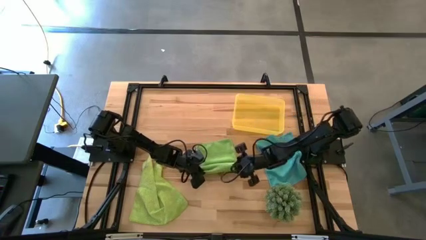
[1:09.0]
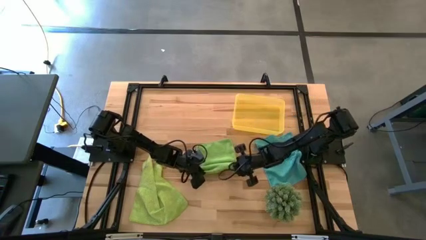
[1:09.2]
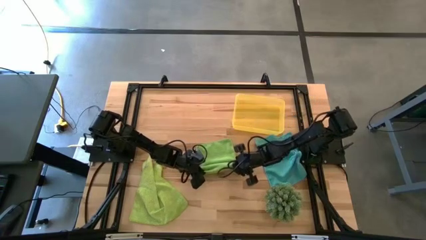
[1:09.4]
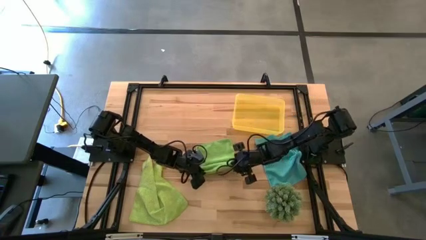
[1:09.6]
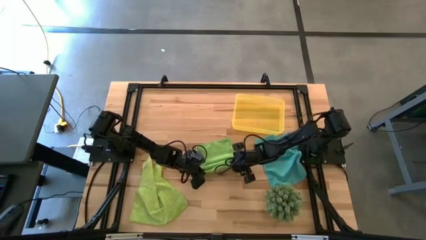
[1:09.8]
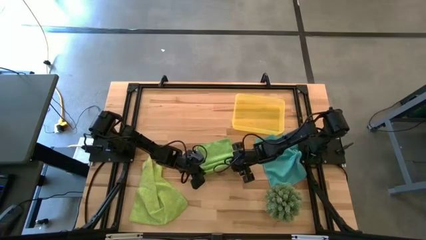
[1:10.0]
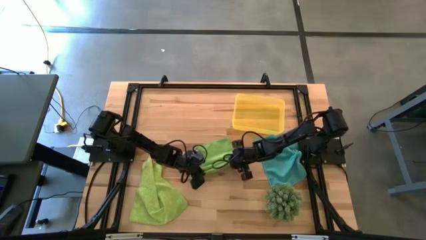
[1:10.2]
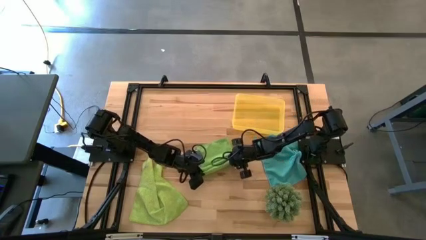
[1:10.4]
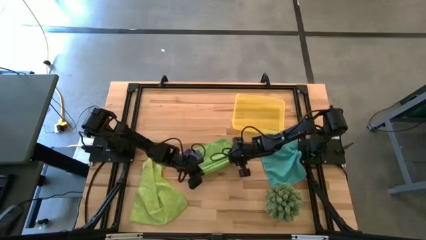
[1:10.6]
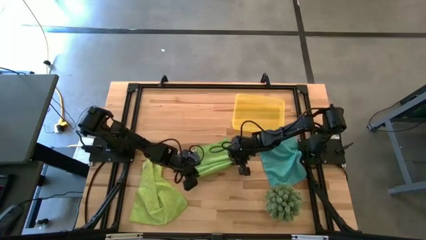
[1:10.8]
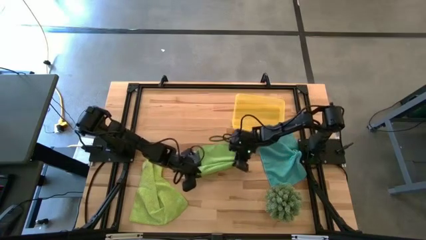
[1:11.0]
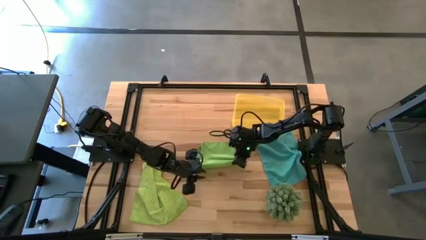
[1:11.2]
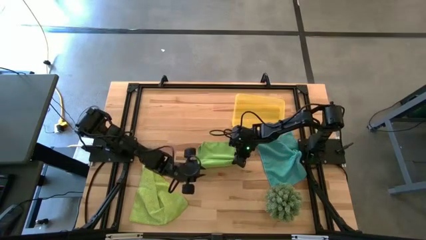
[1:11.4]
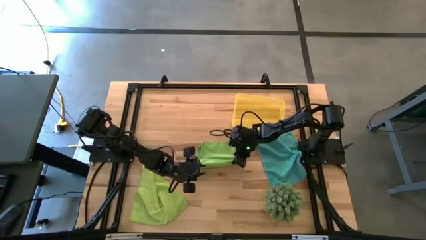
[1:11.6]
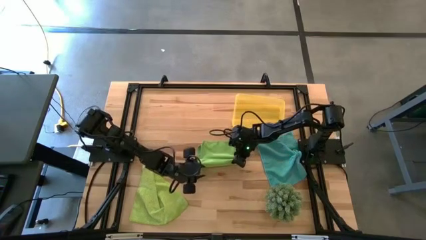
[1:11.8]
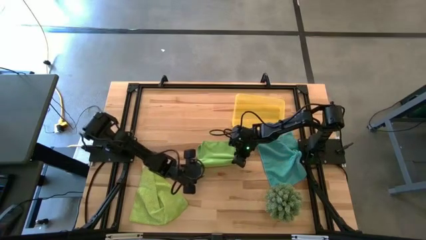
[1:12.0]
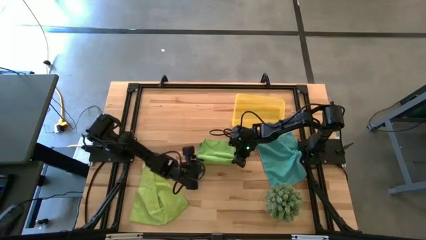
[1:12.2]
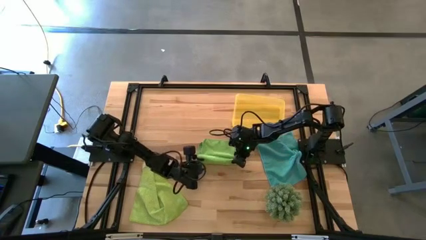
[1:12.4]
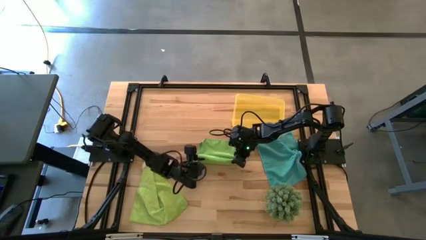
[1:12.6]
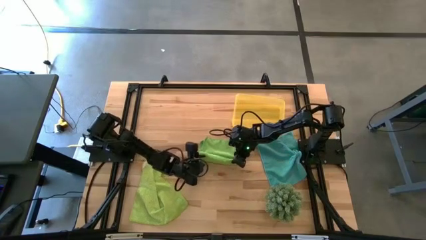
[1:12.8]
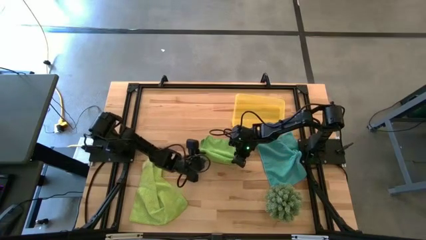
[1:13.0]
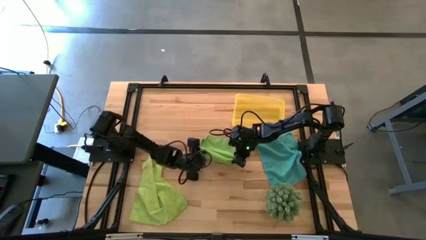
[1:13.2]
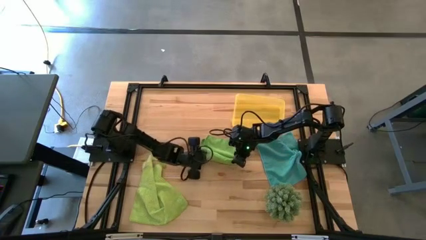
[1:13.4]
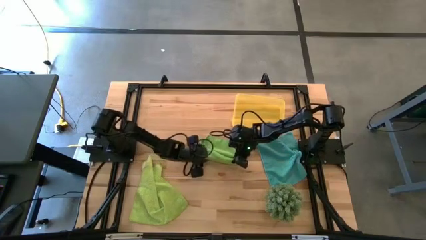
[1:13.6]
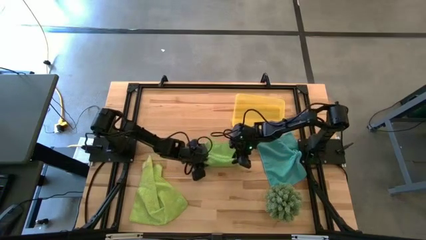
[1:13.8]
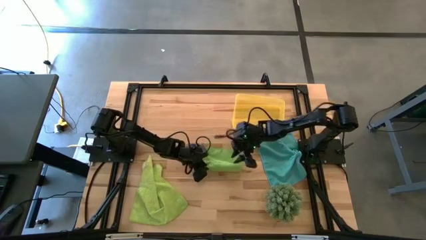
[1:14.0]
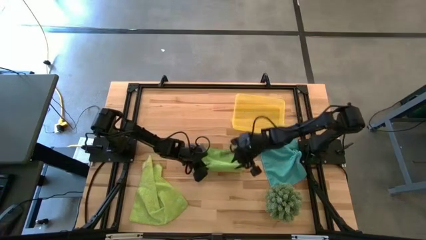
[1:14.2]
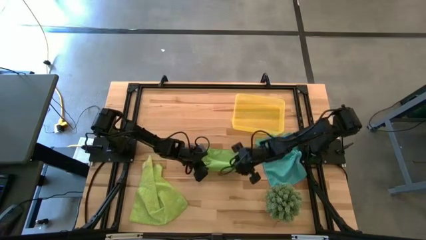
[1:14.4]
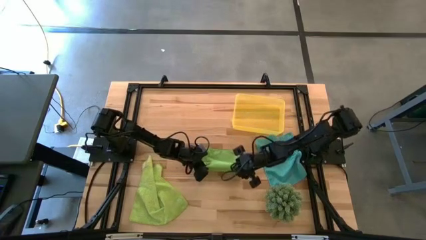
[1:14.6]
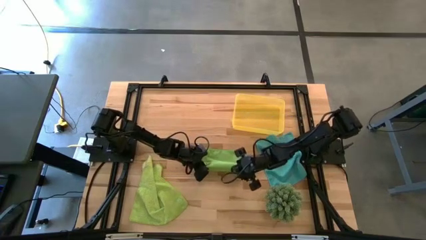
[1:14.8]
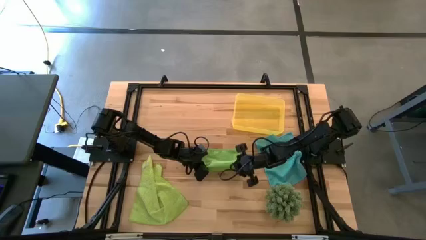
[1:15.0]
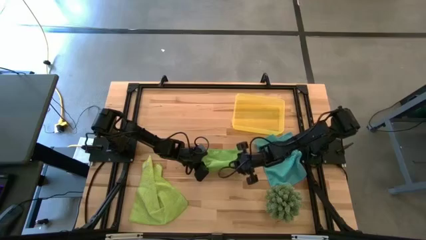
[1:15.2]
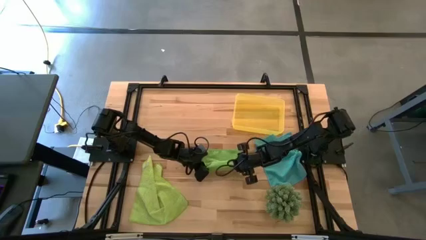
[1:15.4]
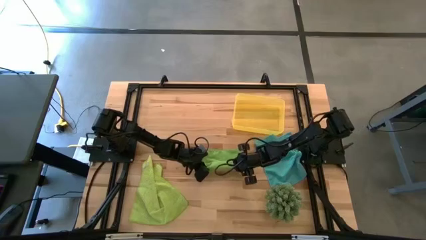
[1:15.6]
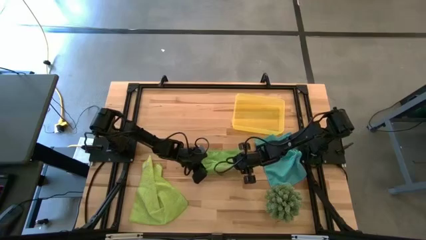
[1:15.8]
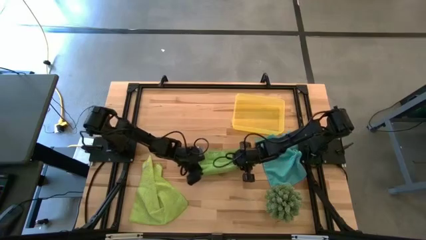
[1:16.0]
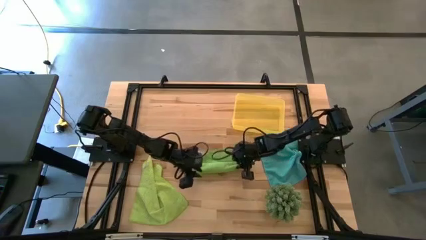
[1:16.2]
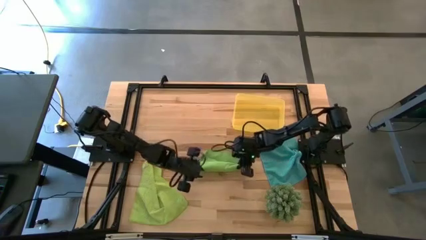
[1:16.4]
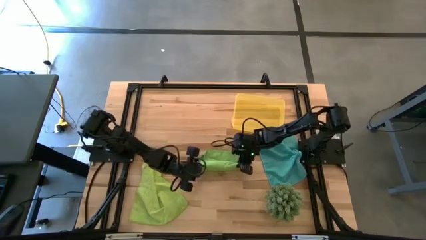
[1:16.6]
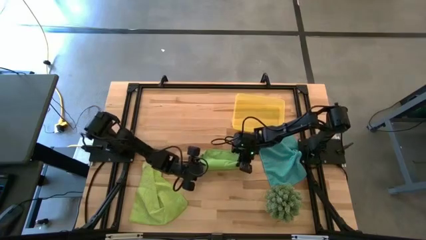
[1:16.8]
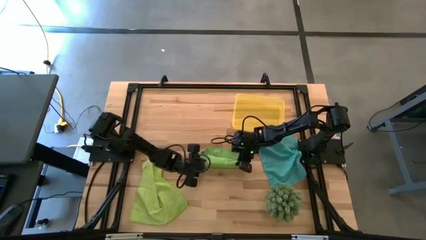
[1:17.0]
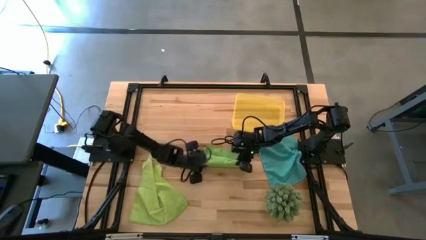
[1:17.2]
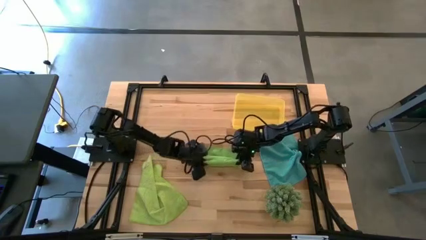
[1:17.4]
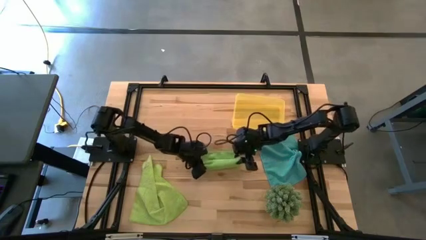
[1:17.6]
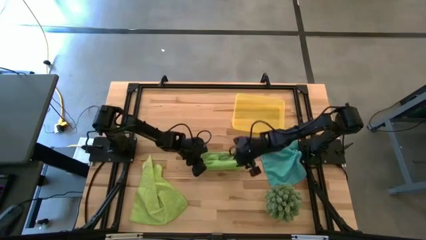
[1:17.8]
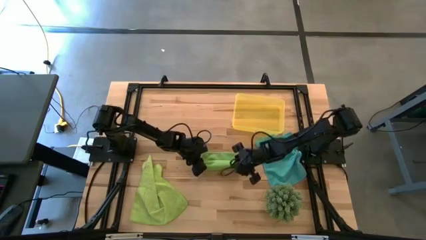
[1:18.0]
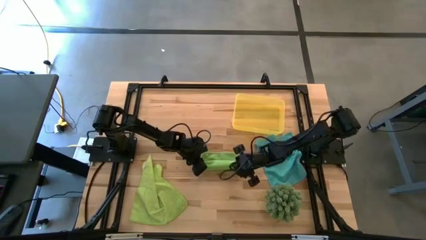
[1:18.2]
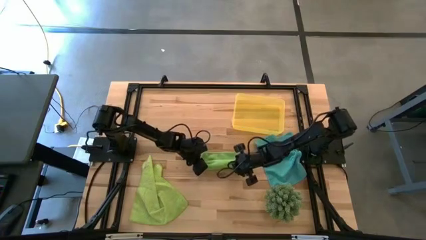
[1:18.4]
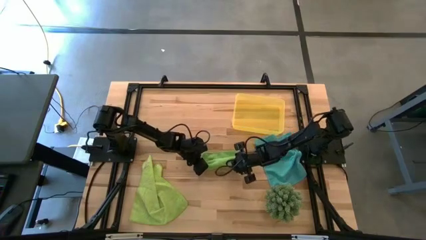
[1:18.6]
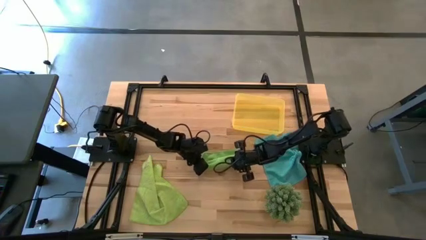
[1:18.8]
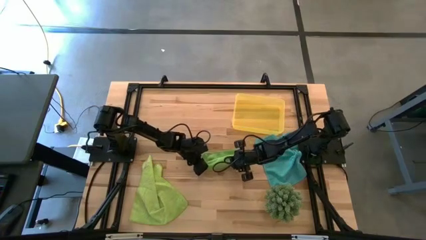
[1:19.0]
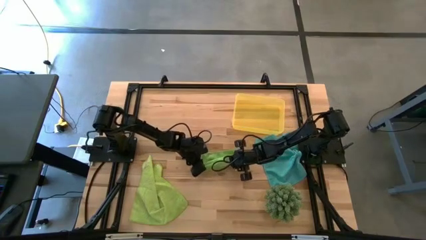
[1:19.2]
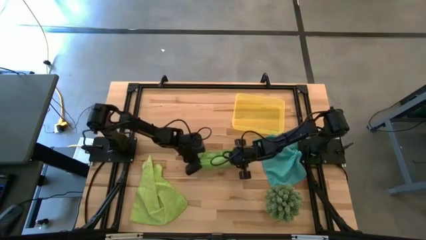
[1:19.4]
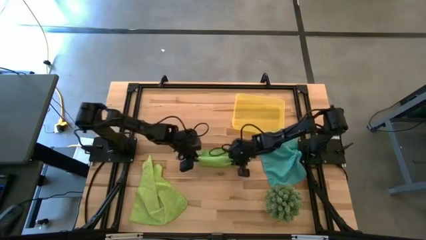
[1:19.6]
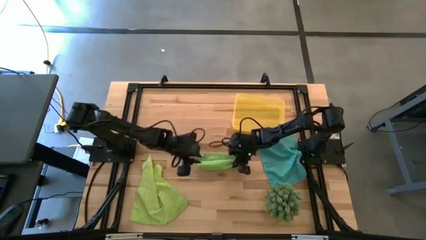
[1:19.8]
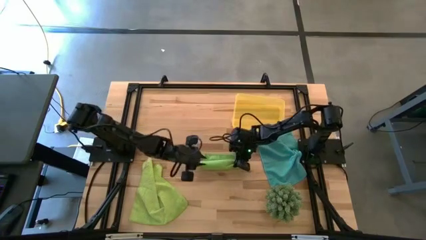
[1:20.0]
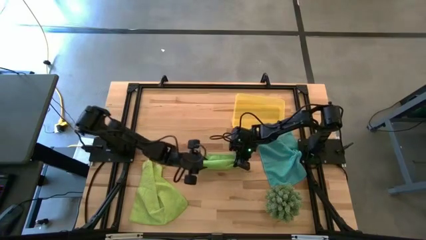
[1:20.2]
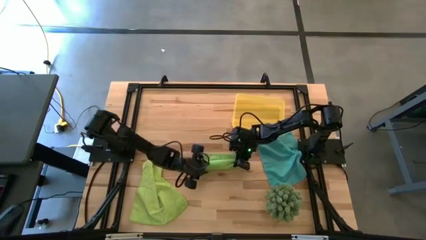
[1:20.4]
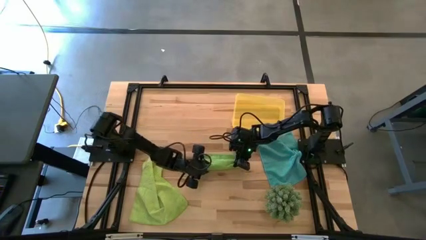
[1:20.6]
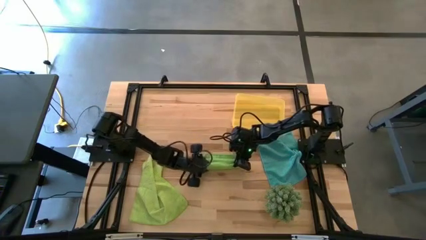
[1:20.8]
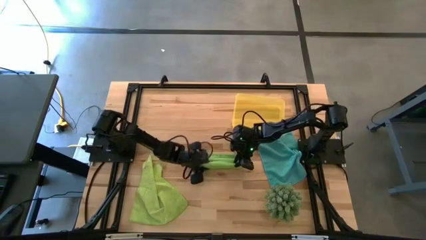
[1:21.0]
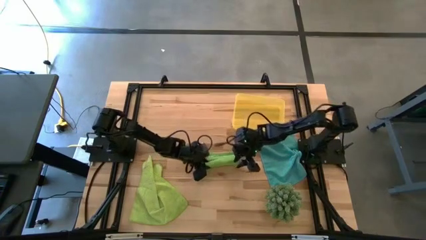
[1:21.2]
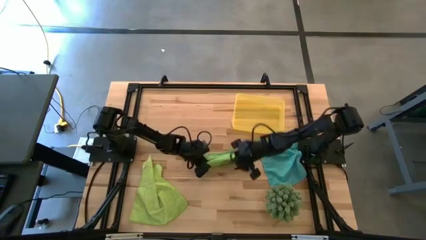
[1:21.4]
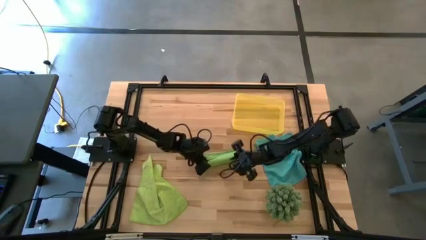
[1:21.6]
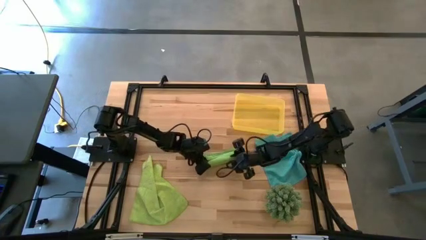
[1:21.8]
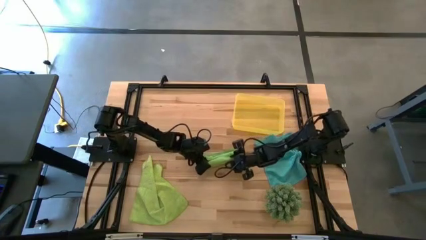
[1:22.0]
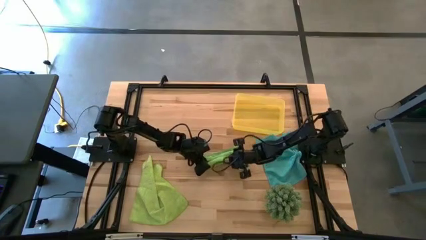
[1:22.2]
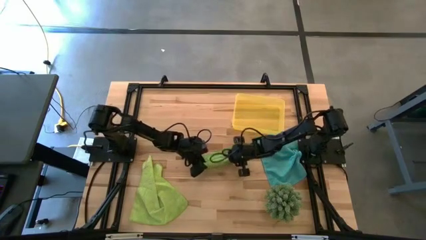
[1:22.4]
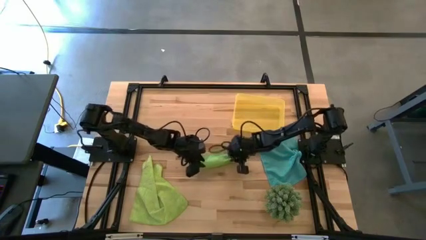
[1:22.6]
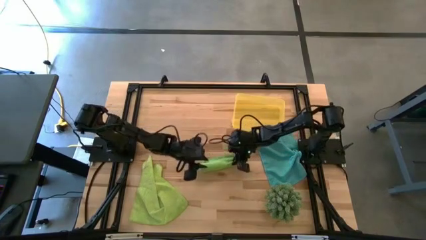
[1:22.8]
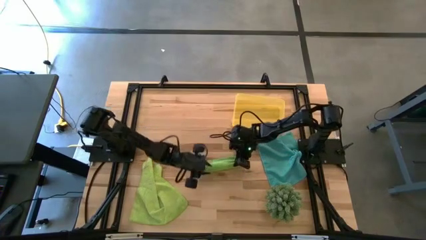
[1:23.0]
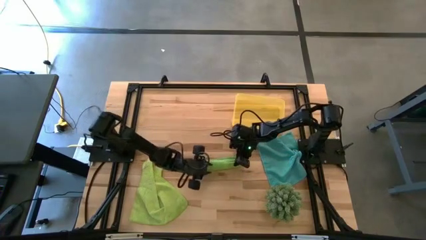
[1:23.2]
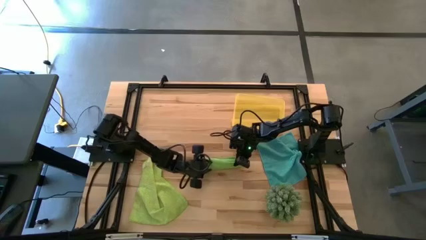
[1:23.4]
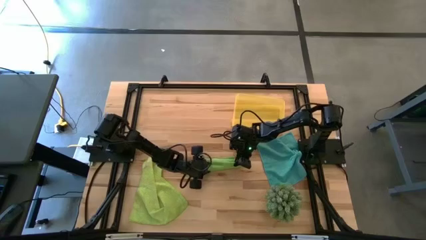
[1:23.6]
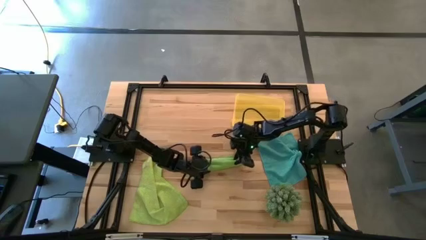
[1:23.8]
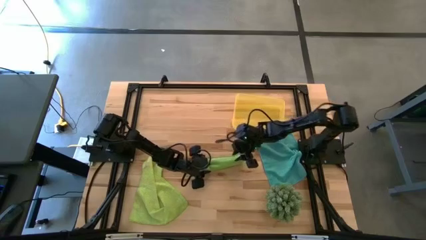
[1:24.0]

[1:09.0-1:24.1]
Task: Roll microfiber towels into tight, uniform cylinder then place into a basket
Roll the top green microfiber towel

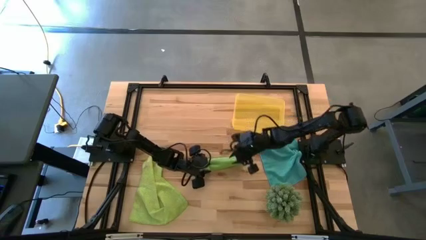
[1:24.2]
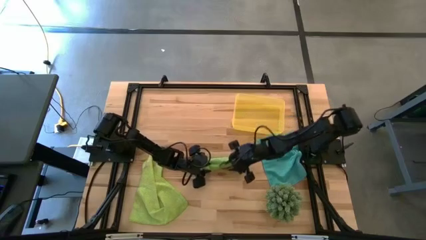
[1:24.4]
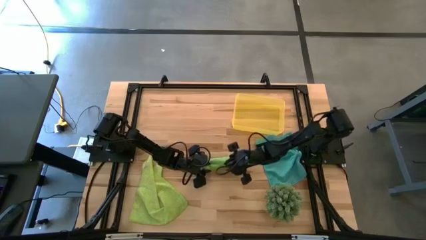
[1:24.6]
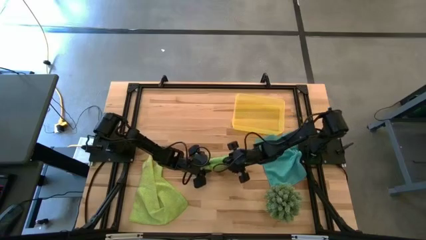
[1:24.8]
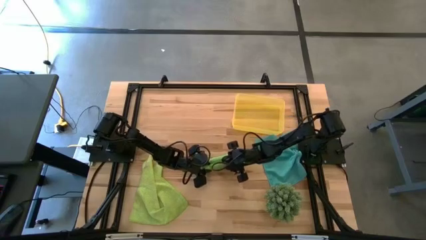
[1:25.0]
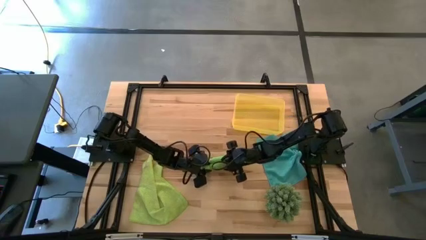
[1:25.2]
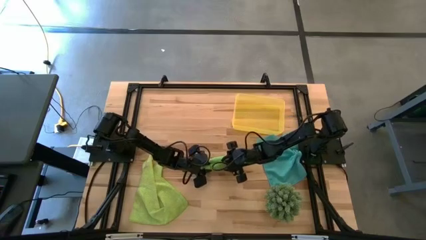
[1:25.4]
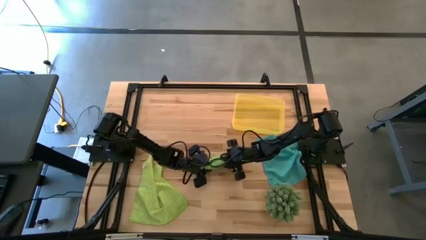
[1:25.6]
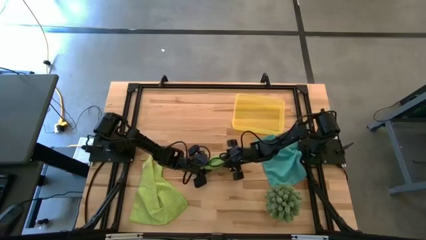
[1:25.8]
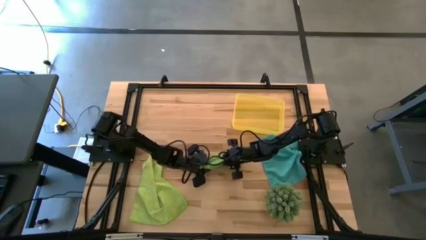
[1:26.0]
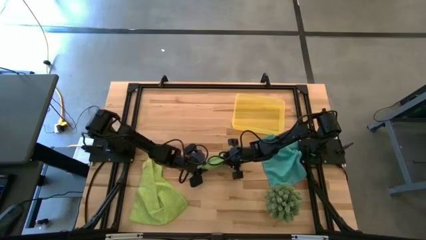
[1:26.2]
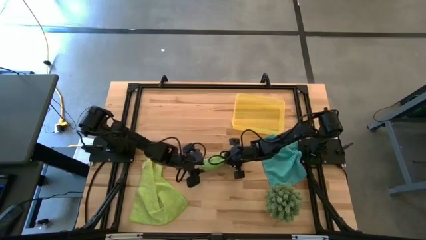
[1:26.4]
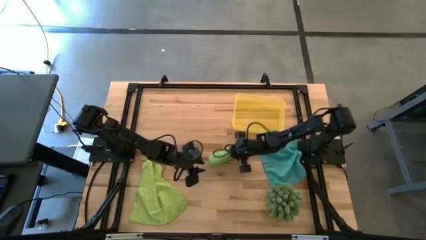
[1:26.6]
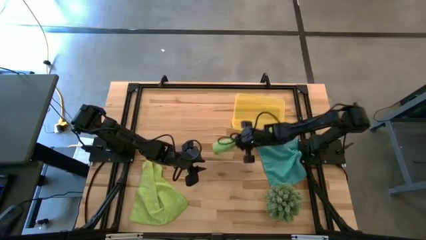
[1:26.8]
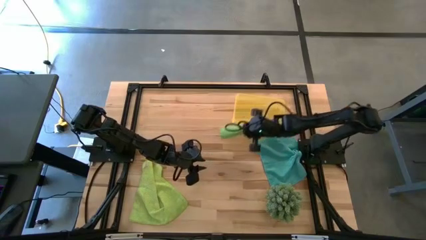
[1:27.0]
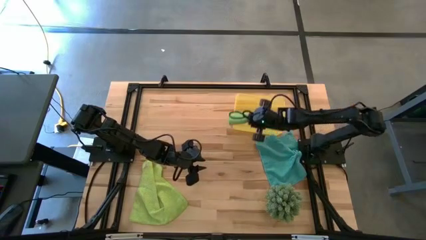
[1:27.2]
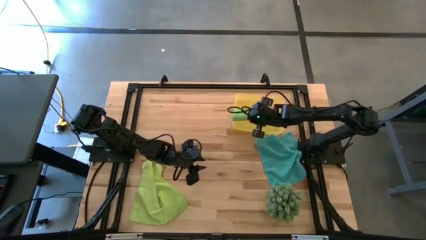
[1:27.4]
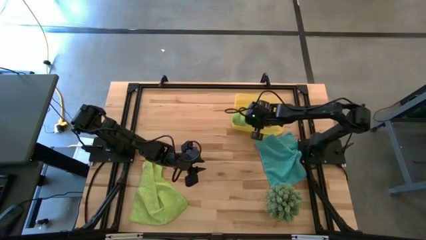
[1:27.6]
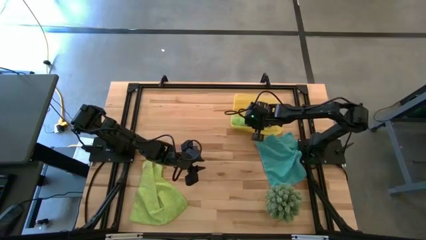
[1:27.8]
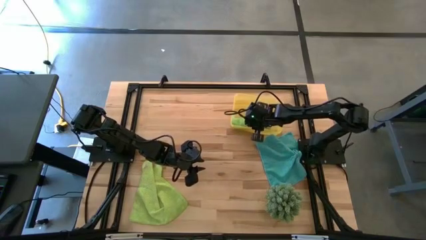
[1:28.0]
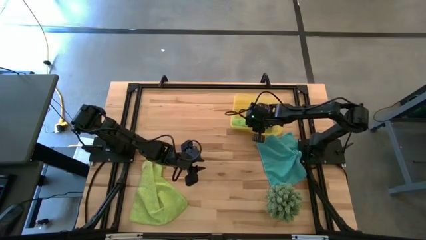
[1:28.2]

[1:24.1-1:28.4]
Put the rolled green microfiber towel into the yellow bin
